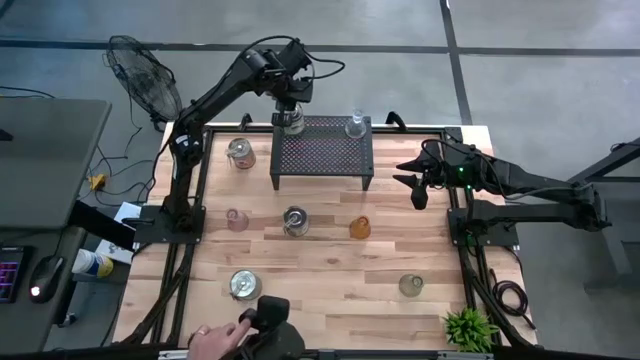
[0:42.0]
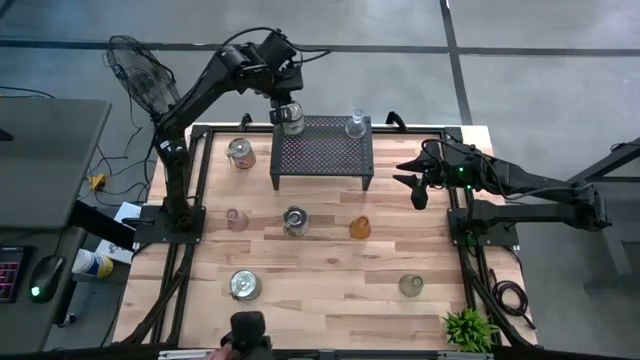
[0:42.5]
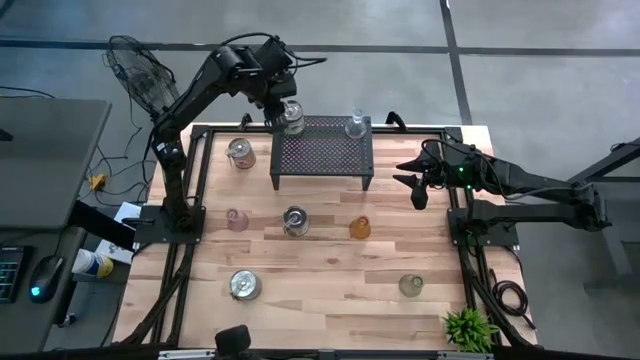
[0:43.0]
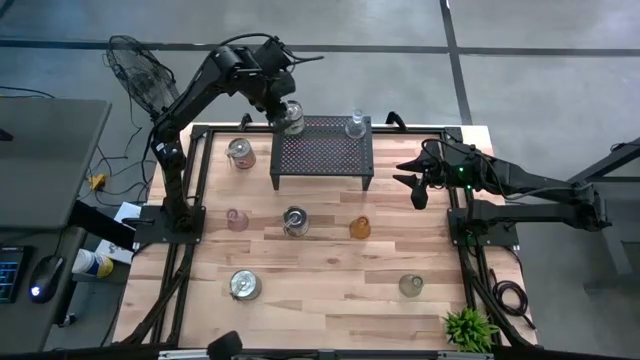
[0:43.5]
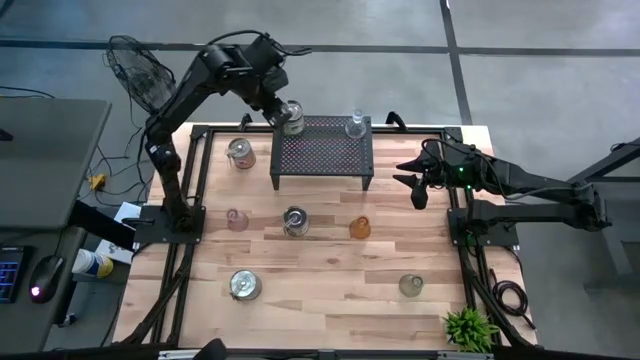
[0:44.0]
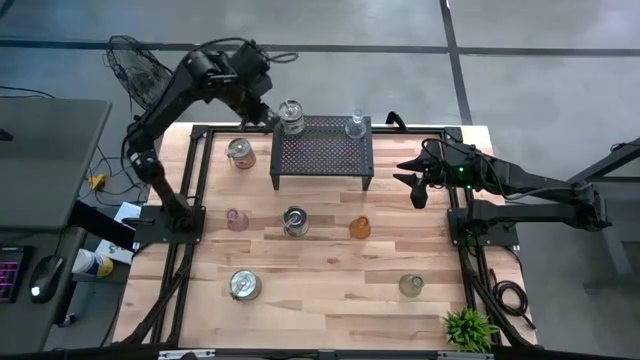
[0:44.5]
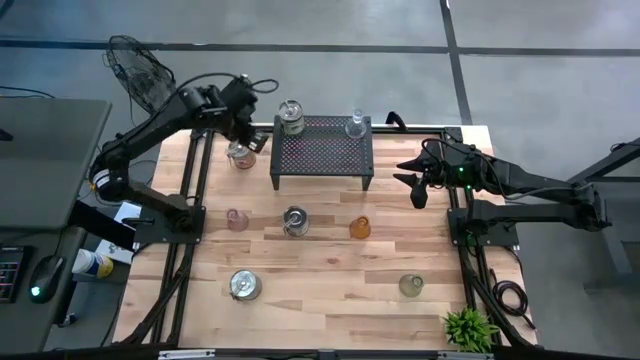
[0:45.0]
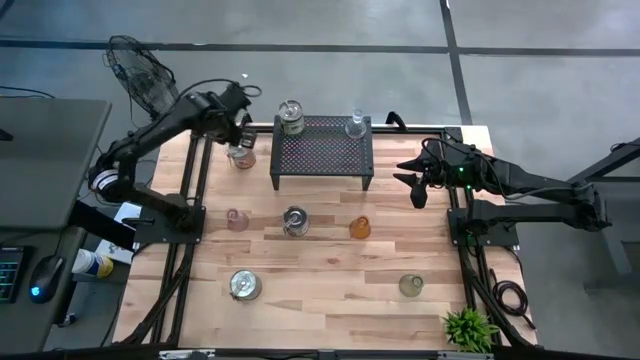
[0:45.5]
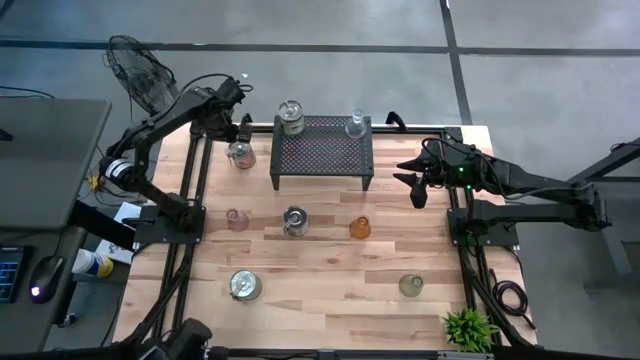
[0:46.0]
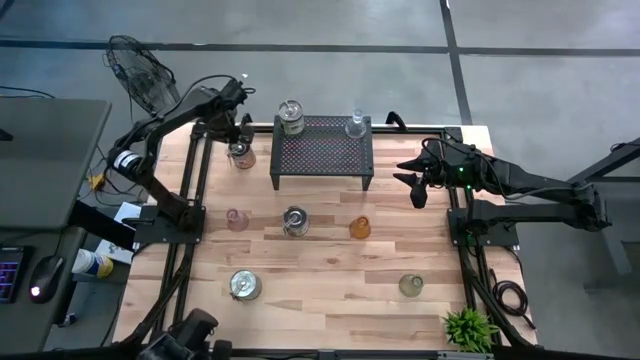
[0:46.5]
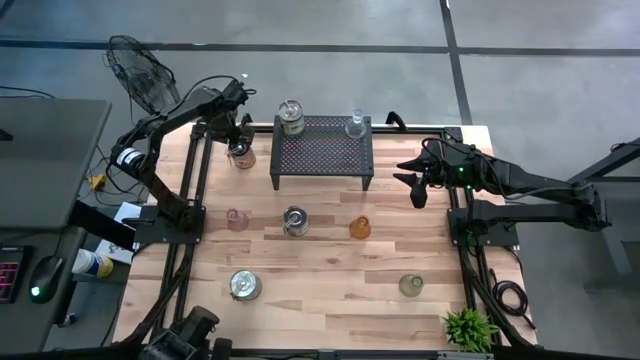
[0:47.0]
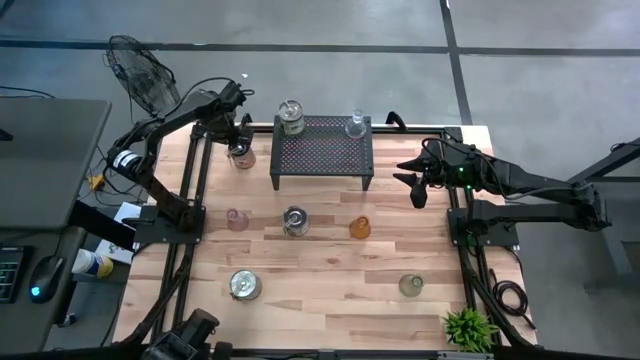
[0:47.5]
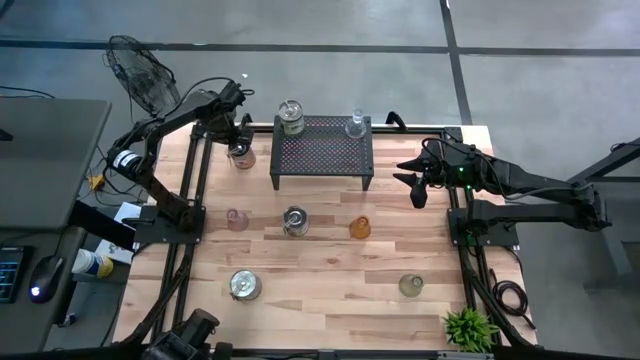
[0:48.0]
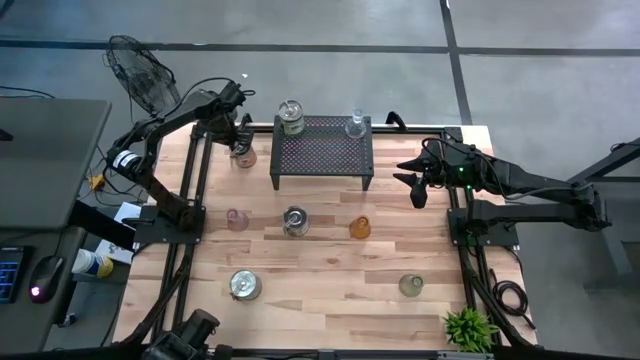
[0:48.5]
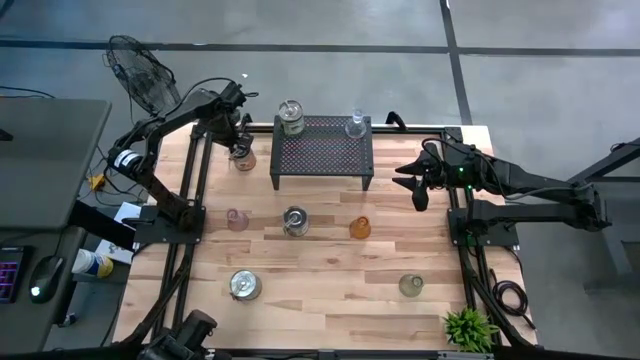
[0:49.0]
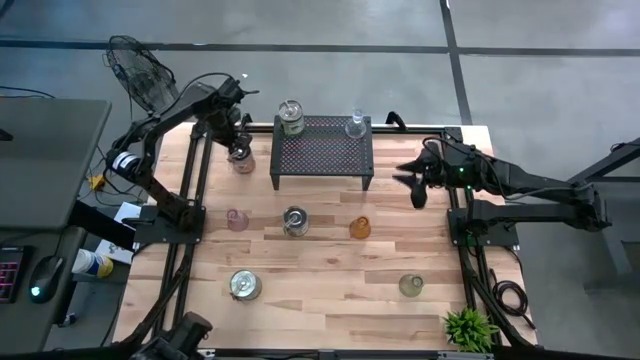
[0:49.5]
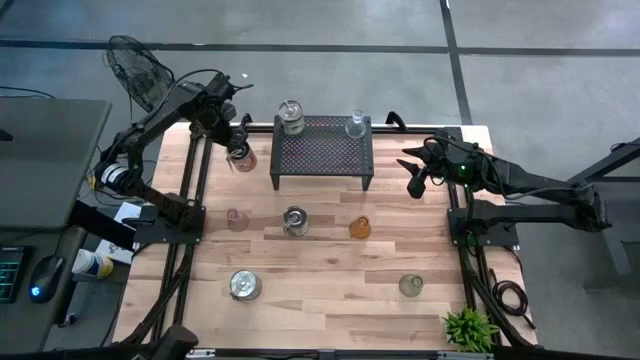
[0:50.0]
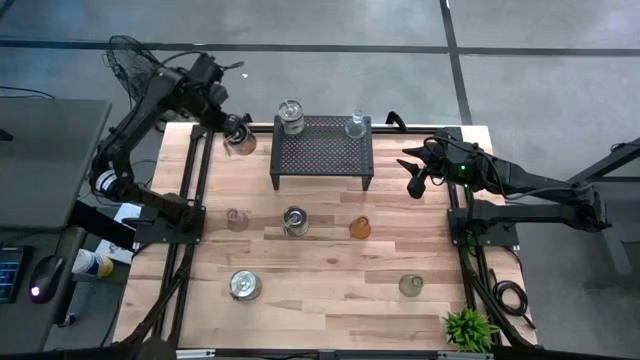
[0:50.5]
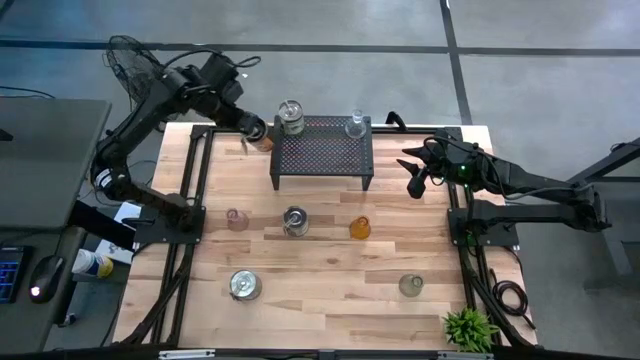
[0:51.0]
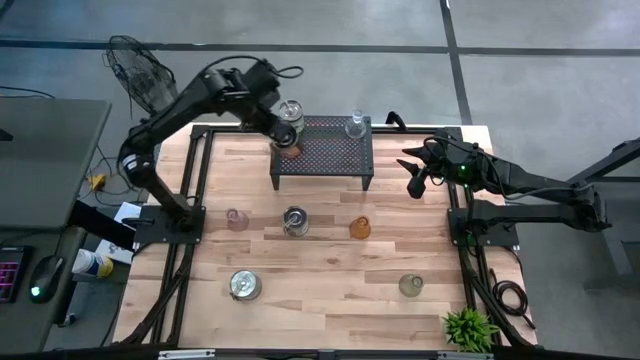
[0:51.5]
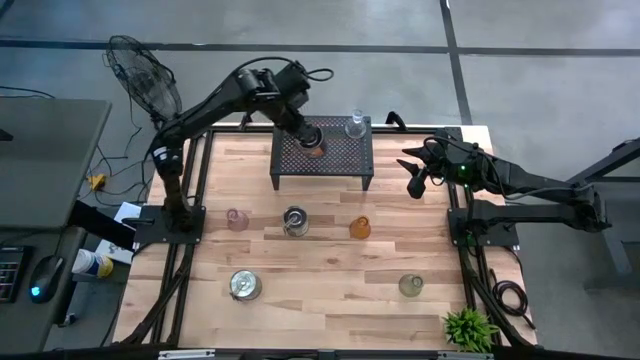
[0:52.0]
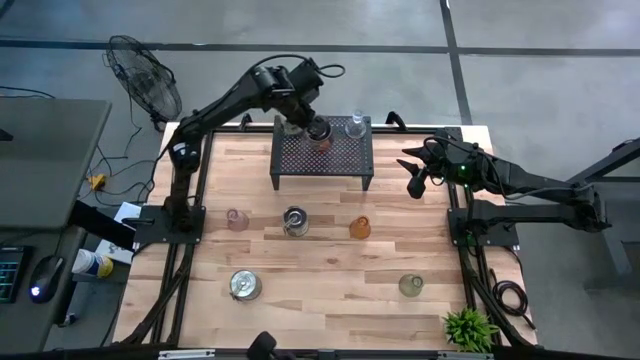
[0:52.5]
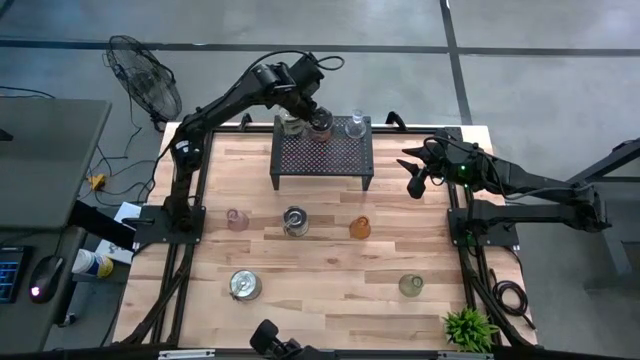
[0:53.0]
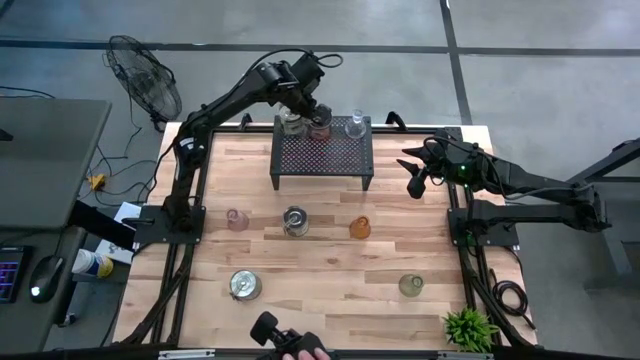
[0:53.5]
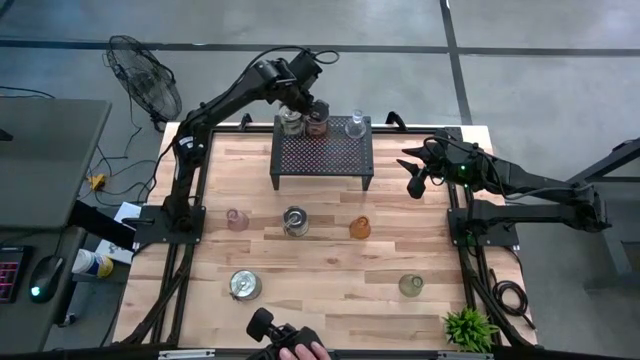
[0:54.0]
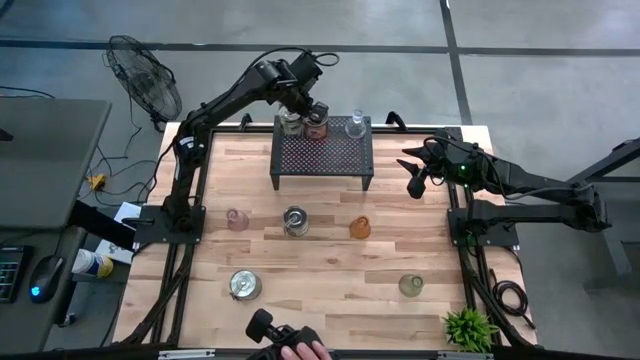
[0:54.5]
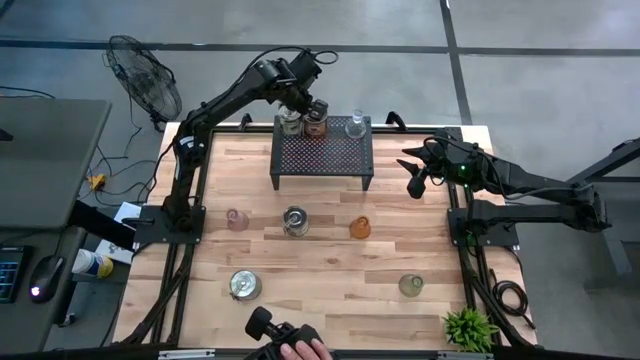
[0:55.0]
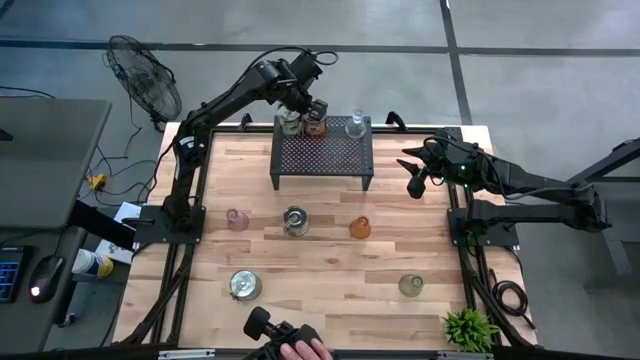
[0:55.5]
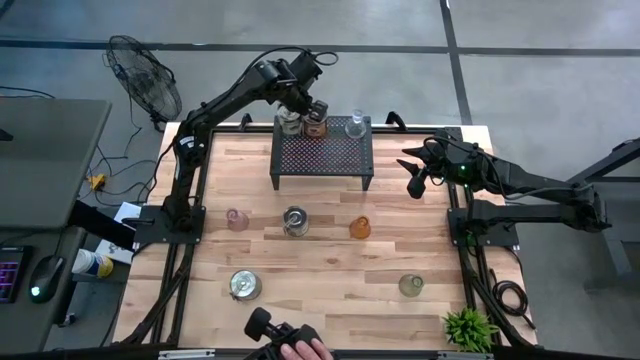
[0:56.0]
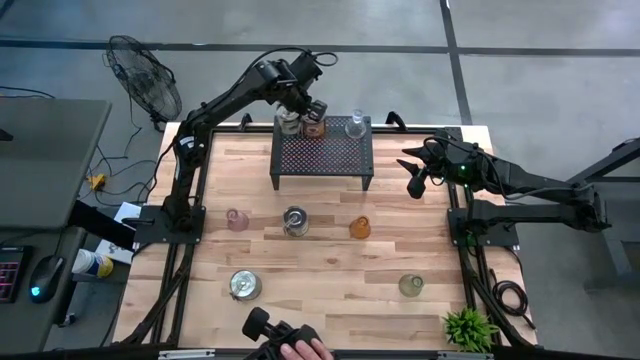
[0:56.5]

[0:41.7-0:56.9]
Task: Pick & Place candle stick holders
Put the silver scented candle can on the shelf

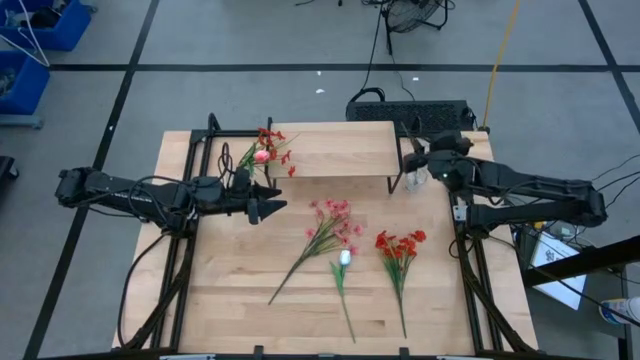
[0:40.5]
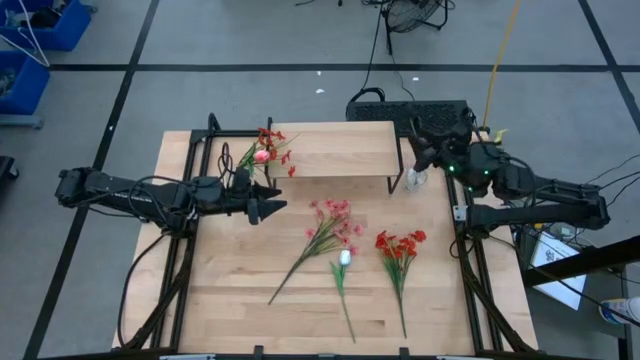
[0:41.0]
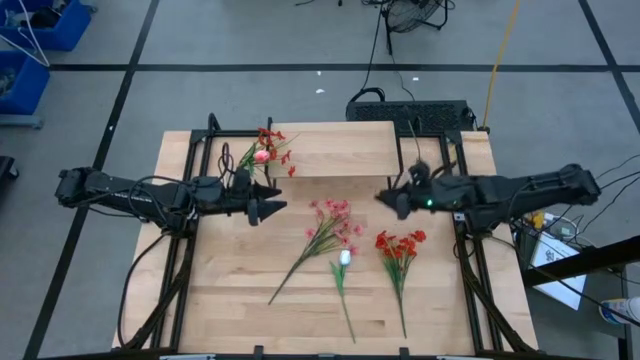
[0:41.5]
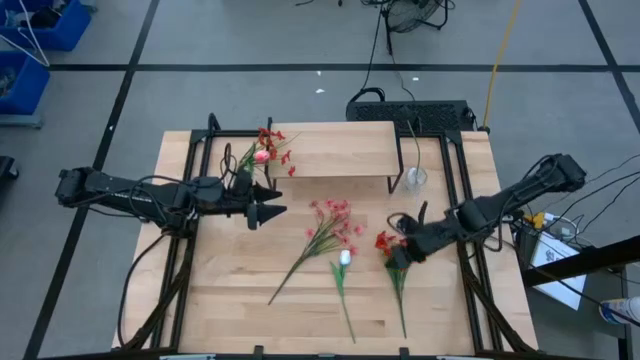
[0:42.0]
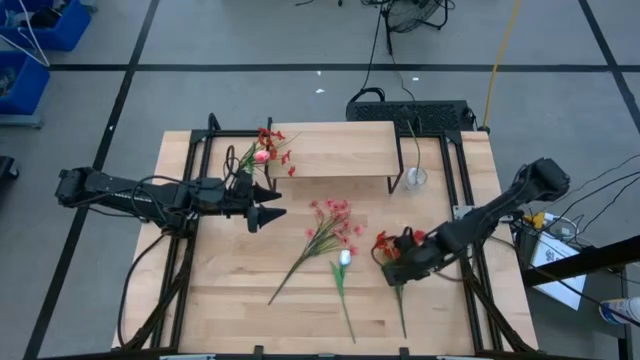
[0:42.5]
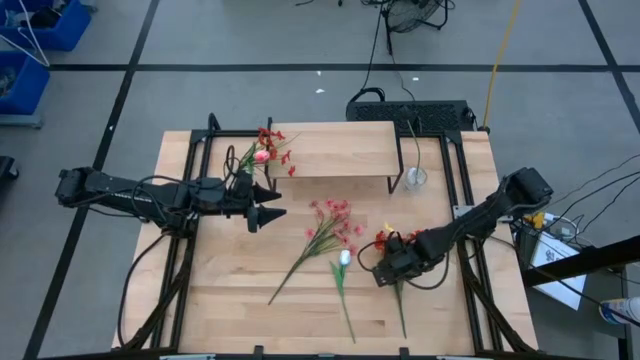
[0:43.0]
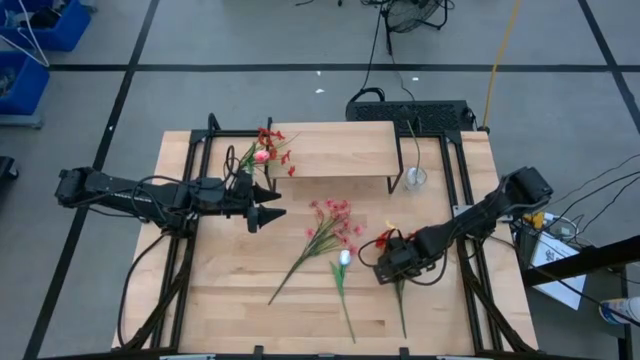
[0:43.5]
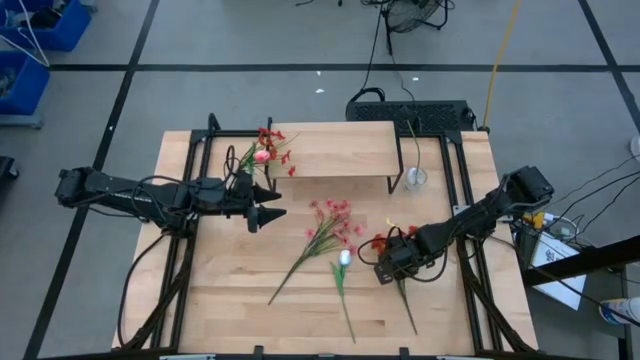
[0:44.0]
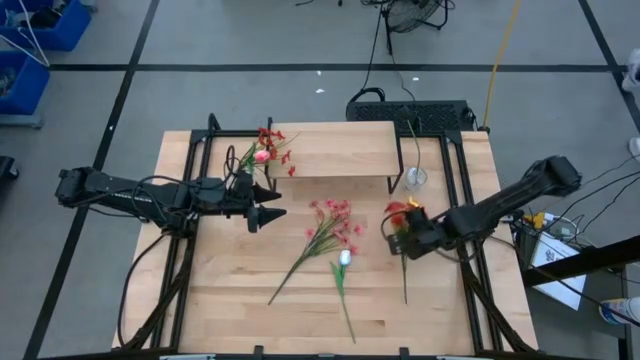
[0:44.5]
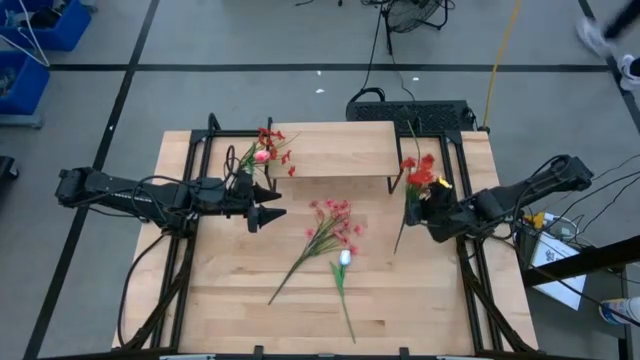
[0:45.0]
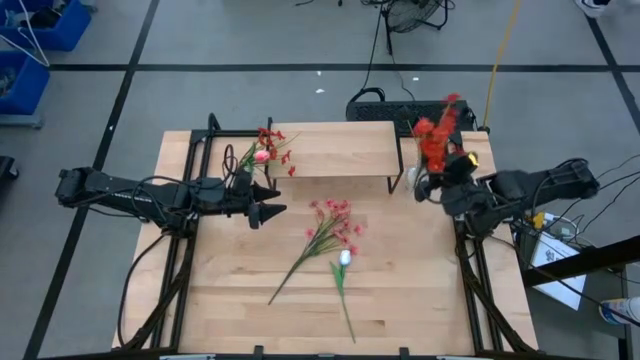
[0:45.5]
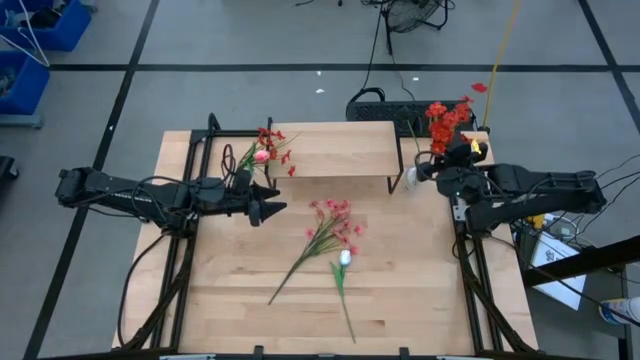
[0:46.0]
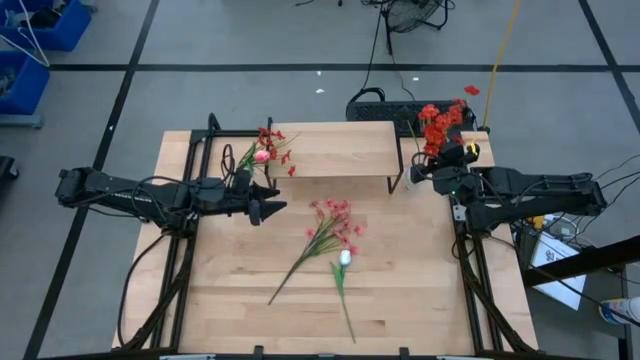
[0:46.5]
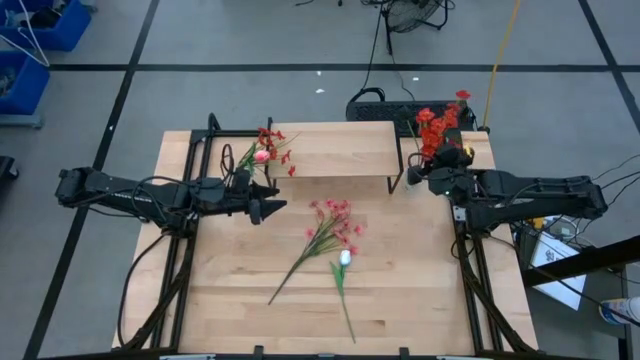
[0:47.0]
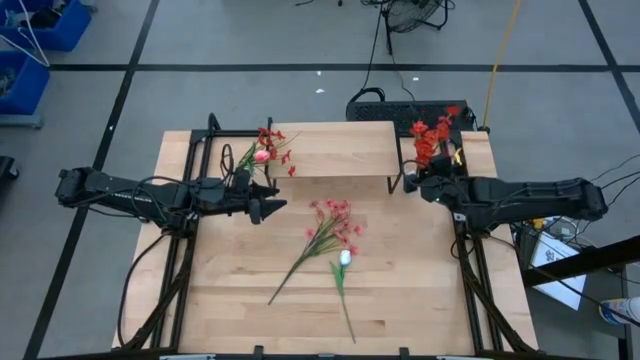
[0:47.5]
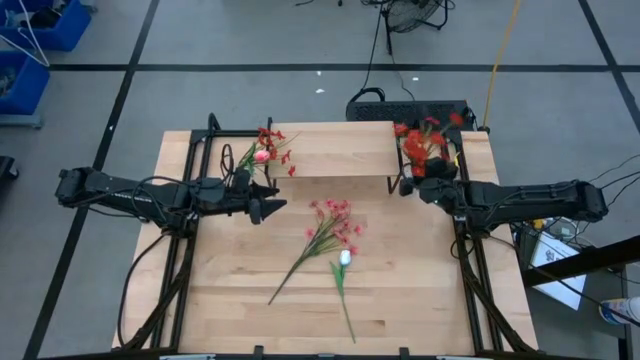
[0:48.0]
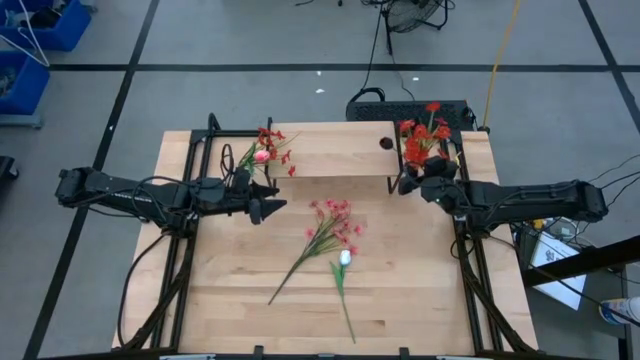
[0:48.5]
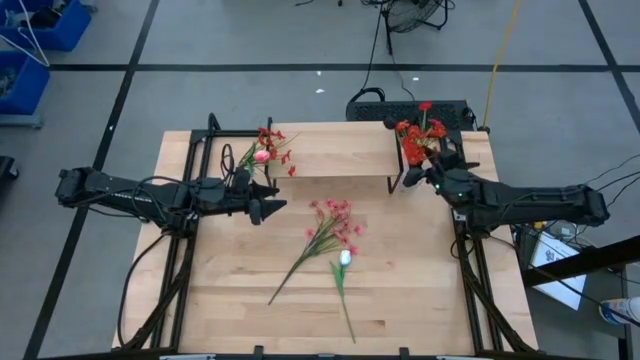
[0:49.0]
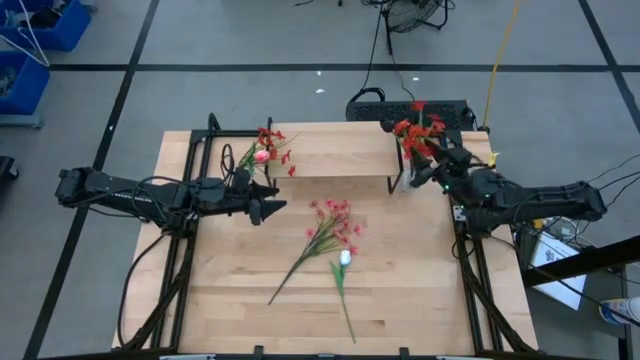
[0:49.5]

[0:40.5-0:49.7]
Task: Pick and place flowers into a vace then onto a shelf
Put the orange flowers into the right transparent vase
